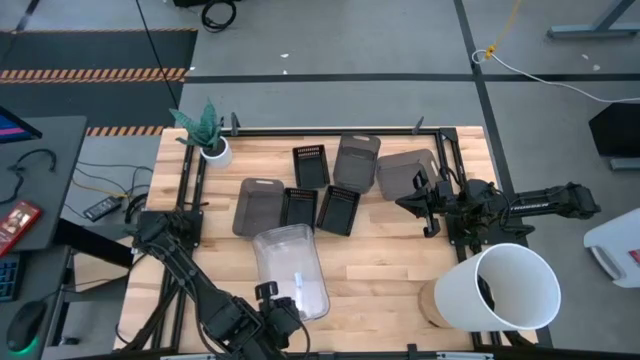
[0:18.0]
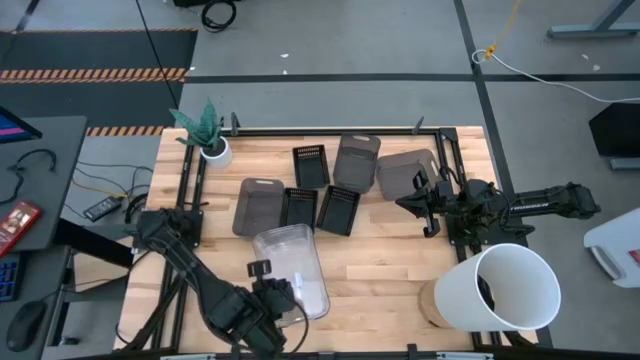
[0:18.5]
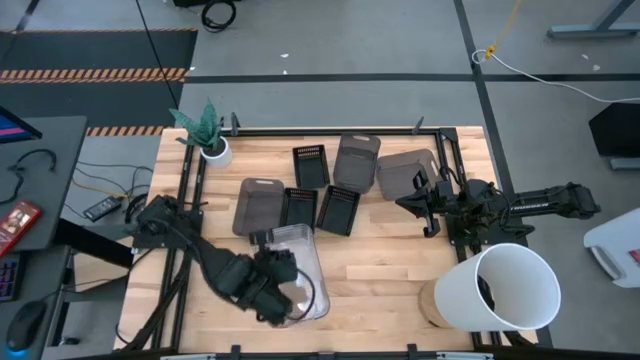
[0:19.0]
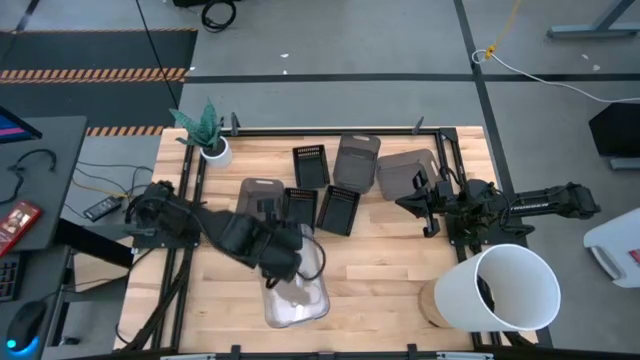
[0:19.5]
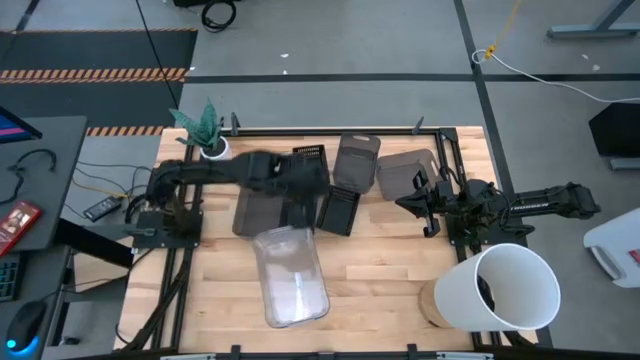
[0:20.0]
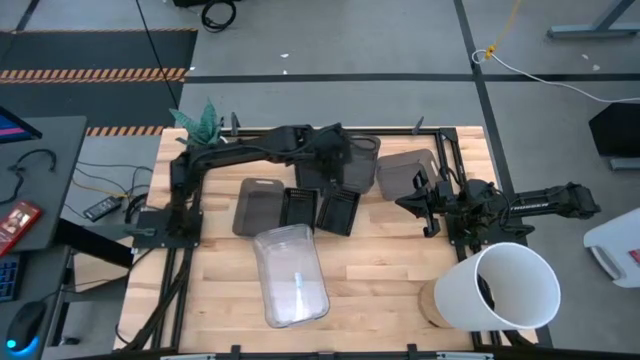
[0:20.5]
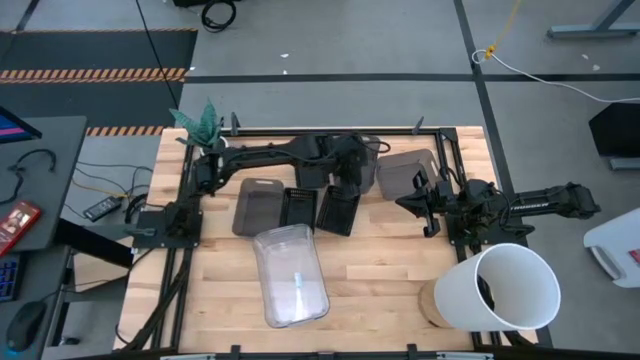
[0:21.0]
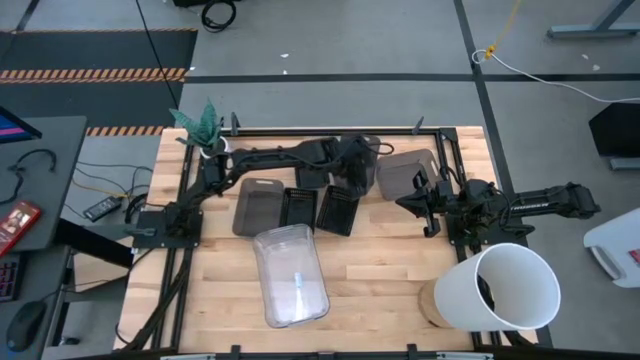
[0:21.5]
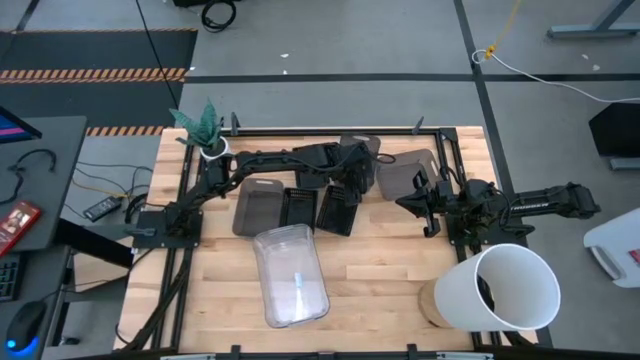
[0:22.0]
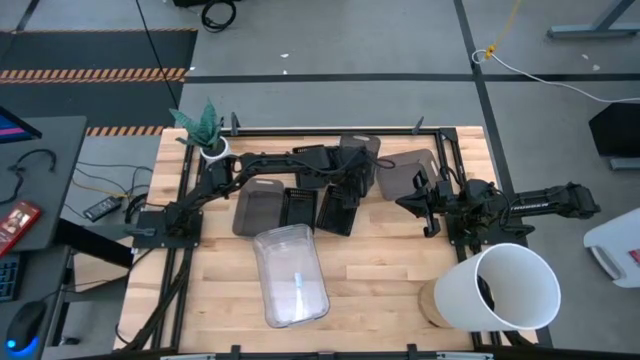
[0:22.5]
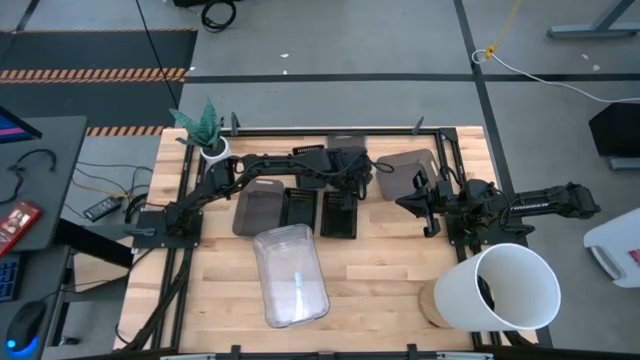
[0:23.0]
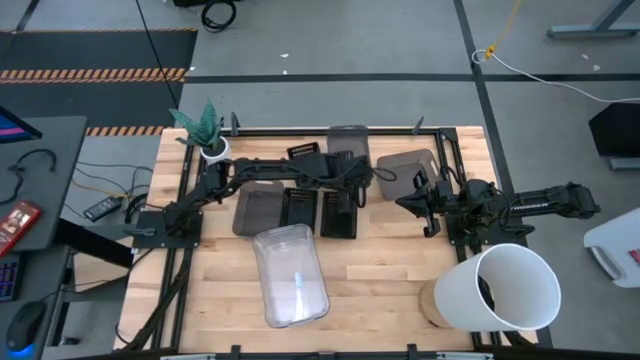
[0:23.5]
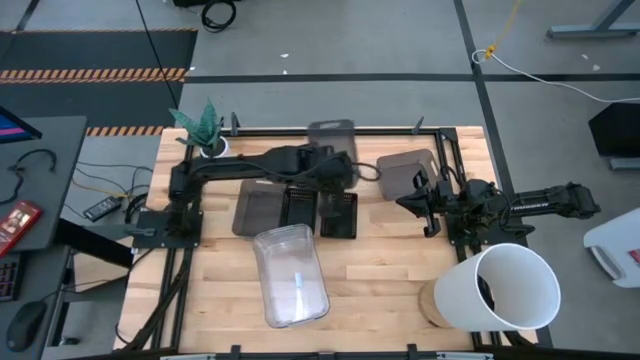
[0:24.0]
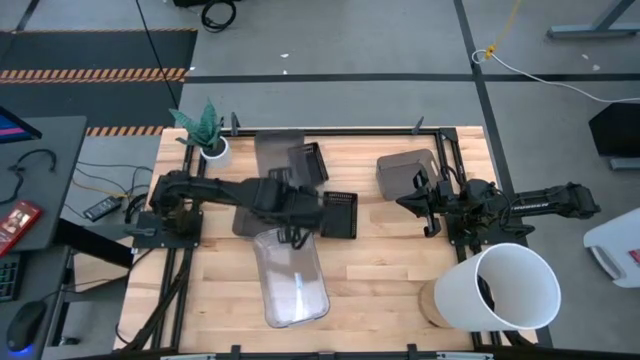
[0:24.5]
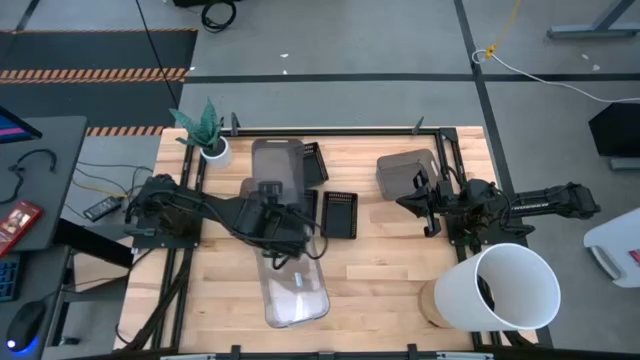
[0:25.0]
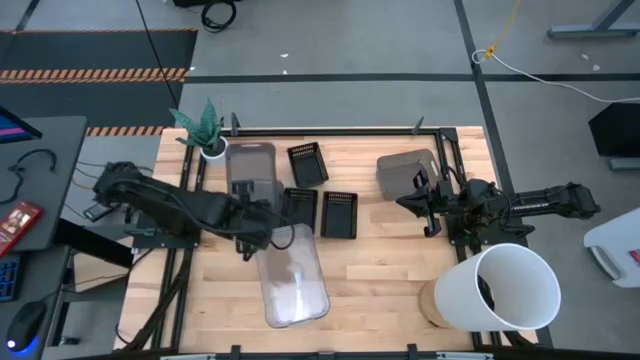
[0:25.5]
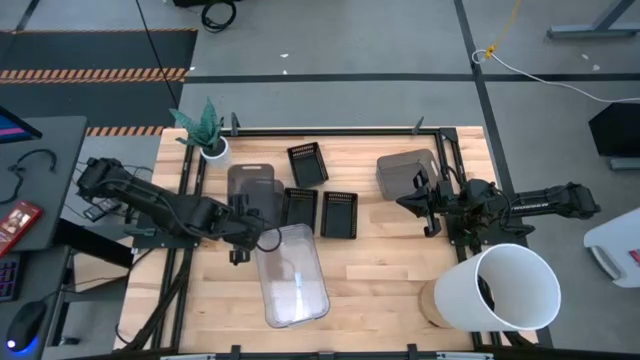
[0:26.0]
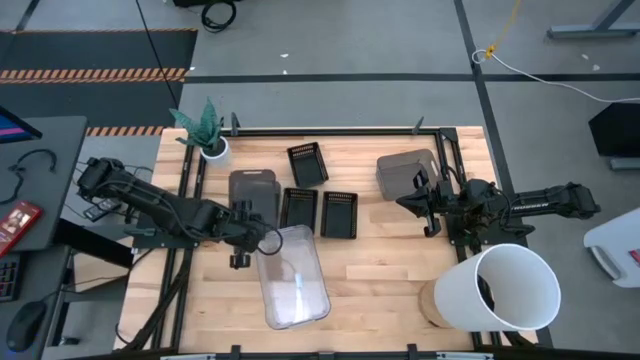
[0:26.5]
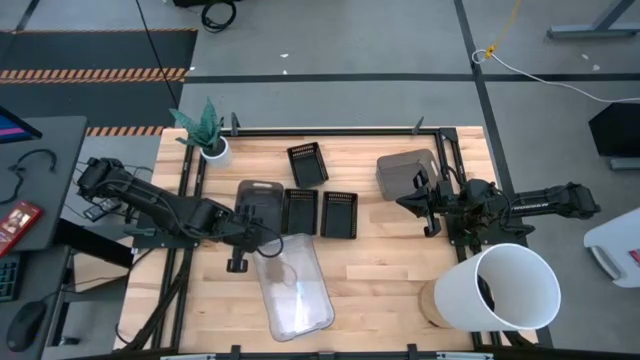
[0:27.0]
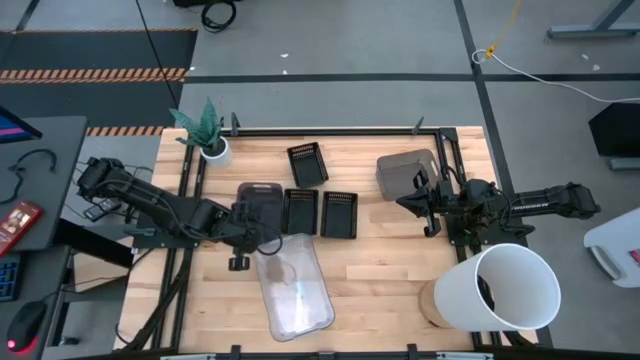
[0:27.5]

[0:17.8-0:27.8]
Stack the middle transparent black bin on top of the left transparent black bin

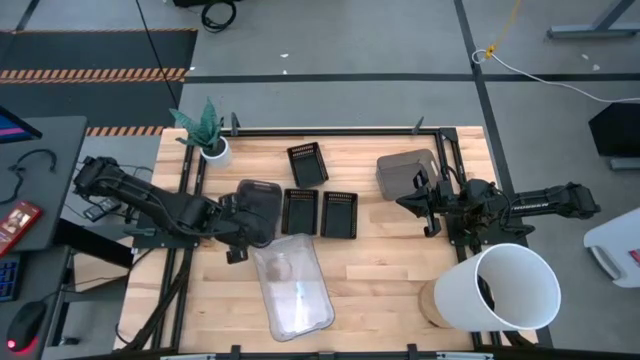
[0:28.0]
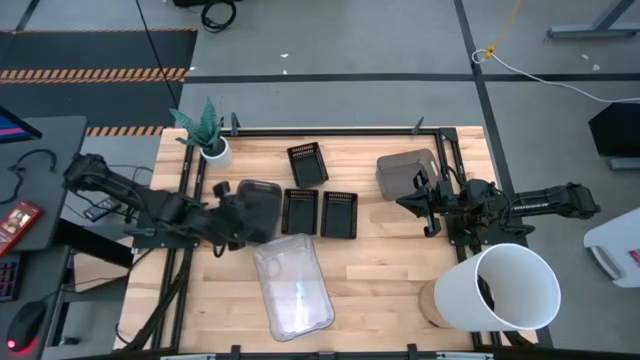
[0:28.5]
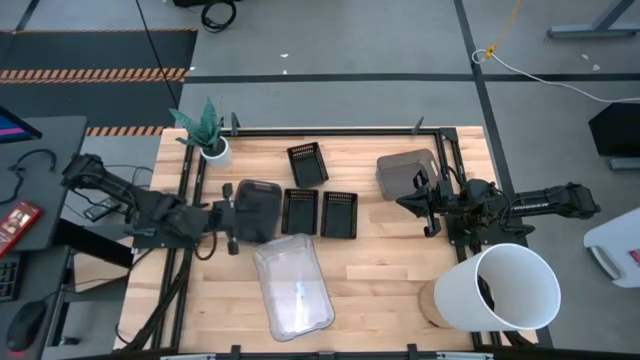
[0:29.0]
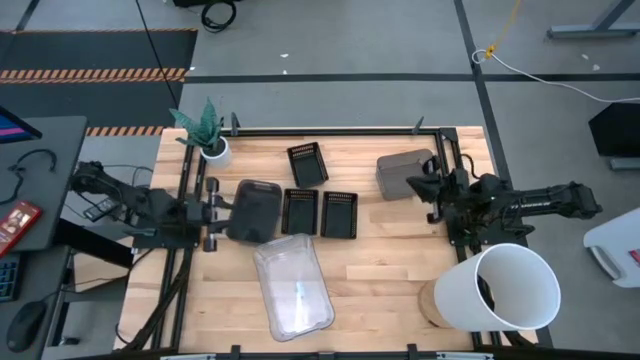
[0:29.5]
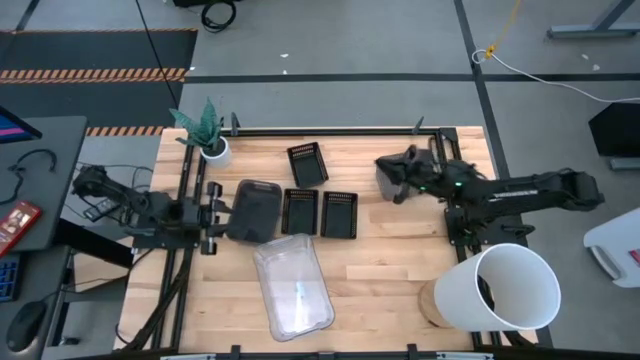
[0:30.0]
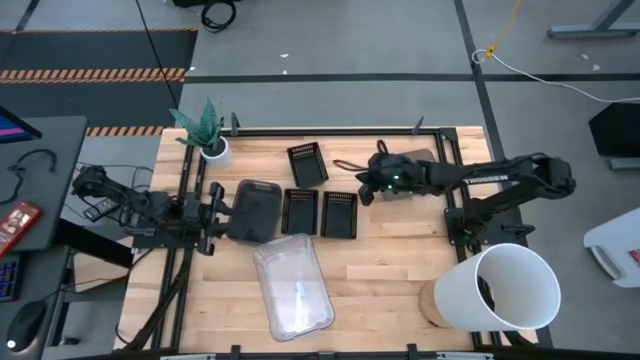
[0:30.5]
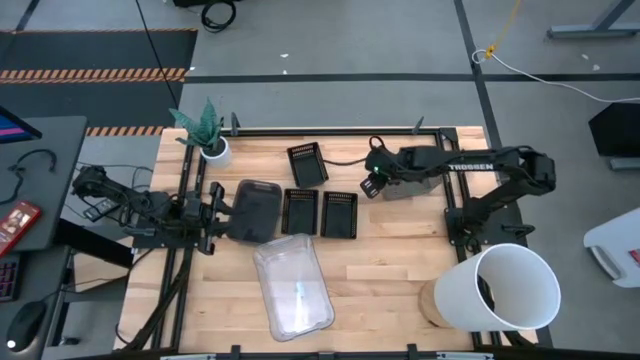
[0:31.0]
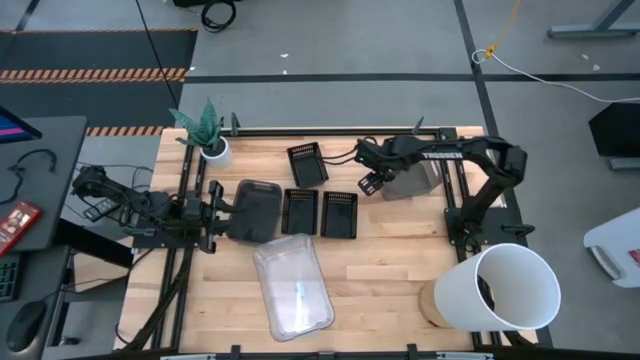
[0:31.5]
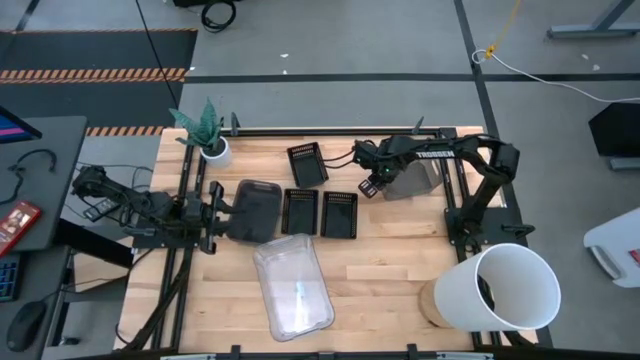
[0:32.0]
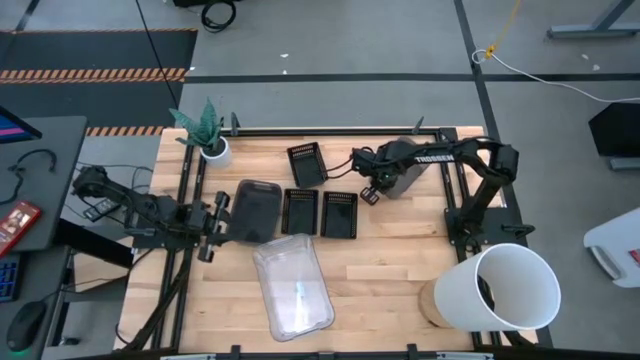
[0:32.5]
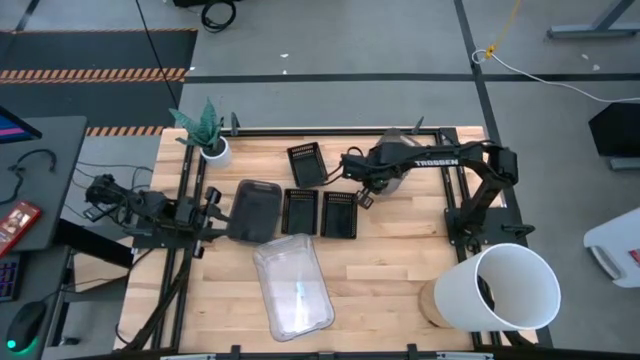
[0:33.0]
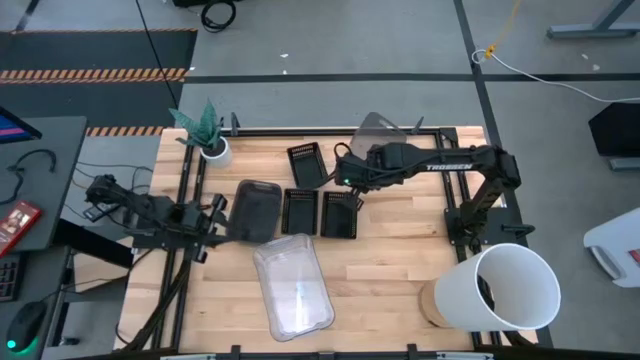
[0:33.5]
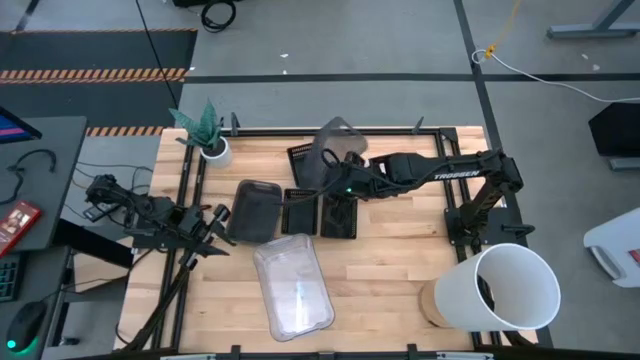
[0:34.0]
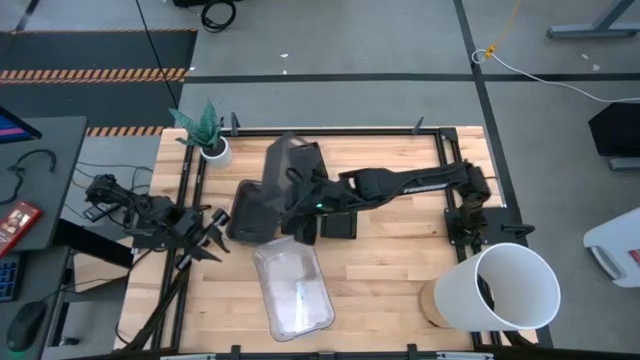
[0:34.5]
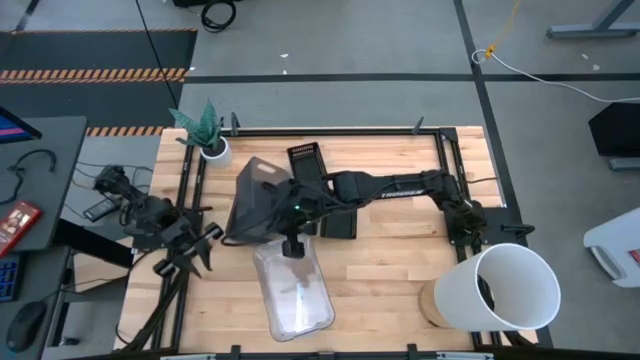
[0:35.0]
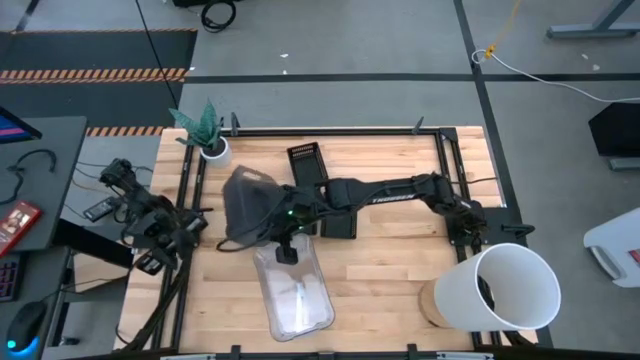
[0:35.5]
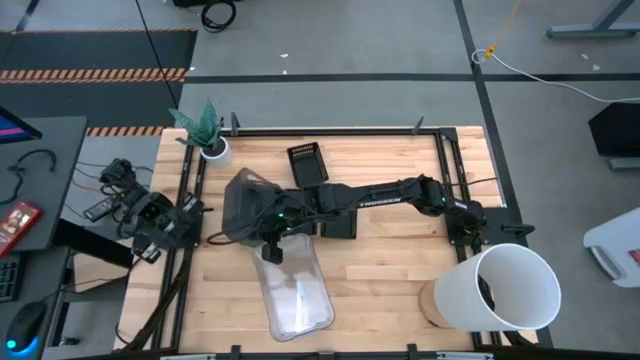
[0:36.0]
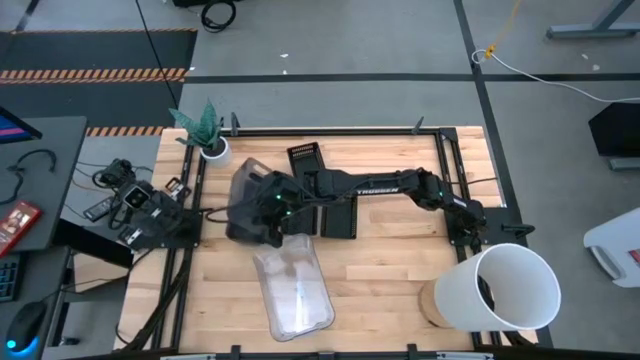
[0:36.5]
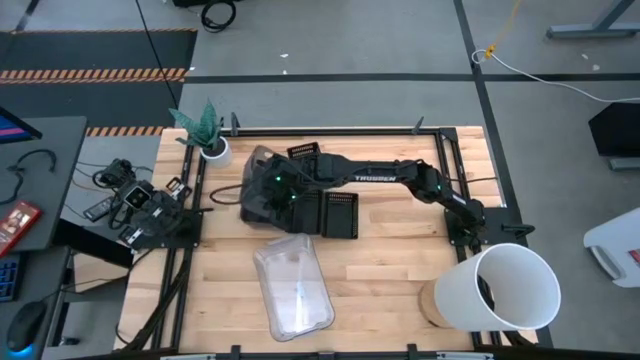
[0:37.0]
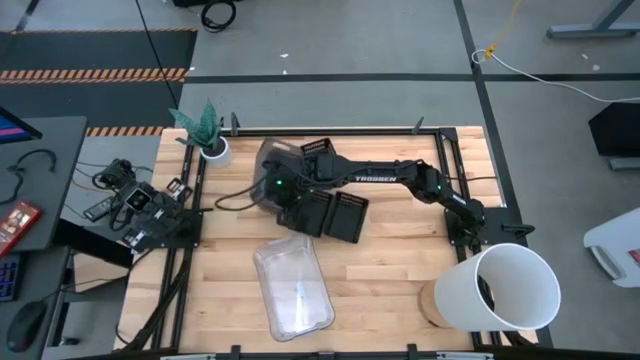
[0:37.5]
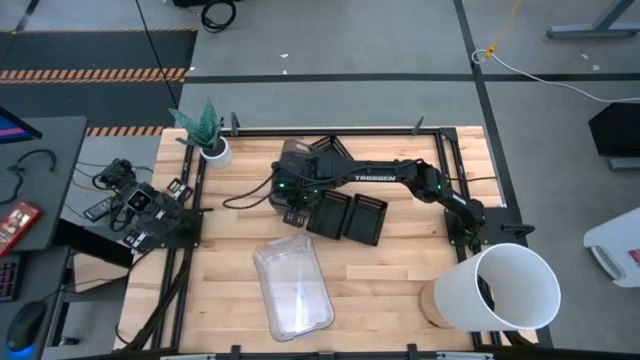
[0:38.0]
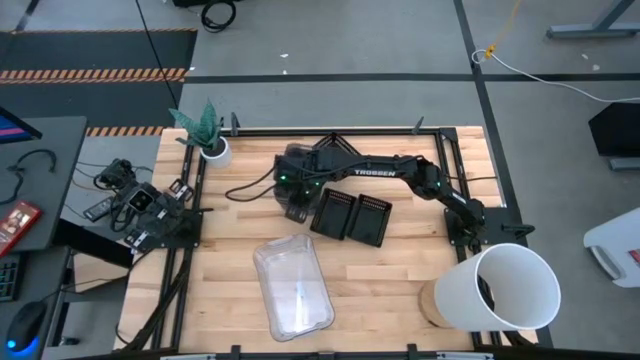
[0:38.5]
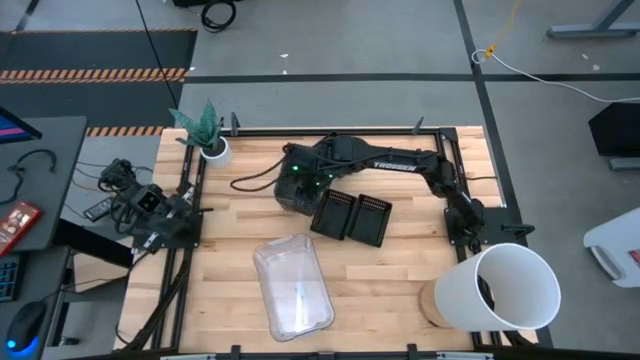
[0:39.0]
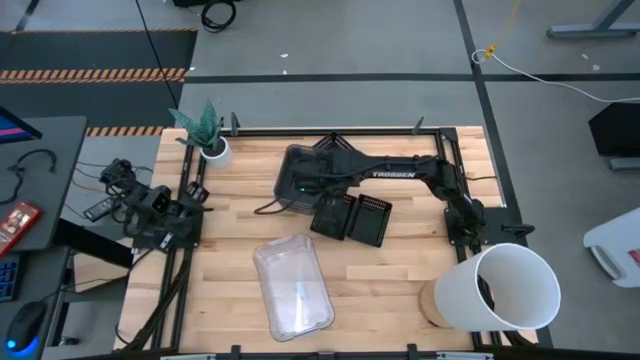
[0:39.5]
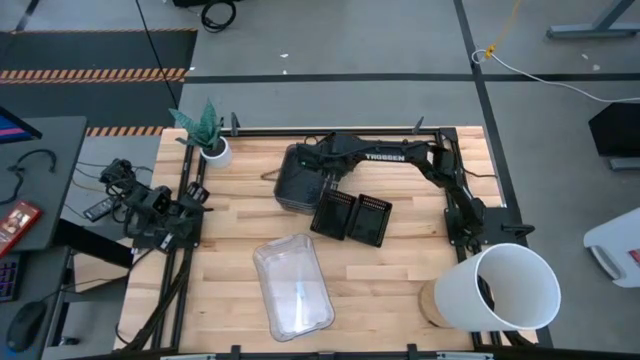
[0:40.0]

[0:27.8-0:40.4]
Stack the transparent black bin on top of the transparent black bin
